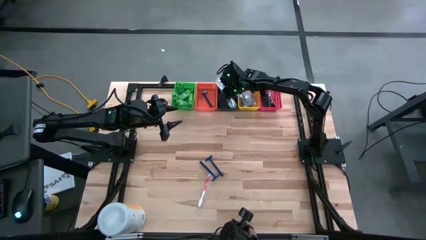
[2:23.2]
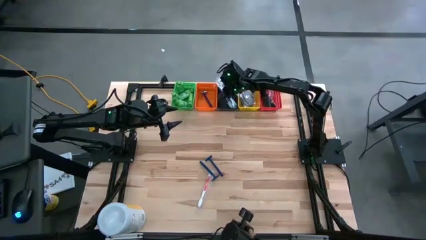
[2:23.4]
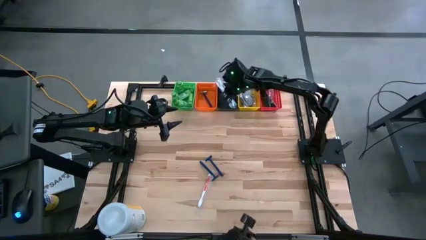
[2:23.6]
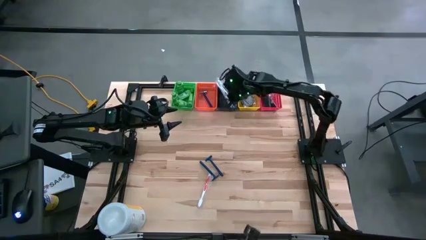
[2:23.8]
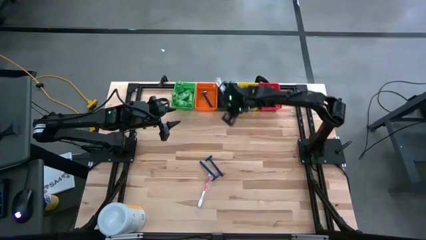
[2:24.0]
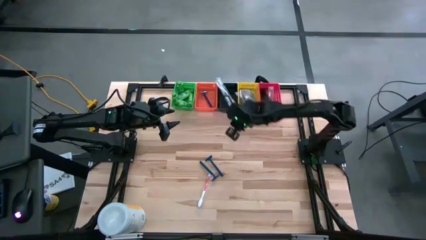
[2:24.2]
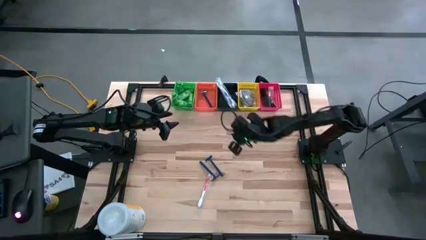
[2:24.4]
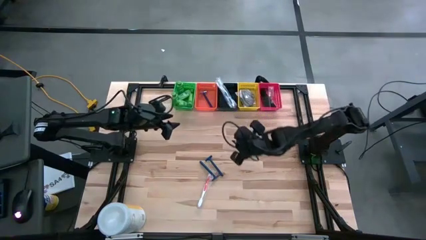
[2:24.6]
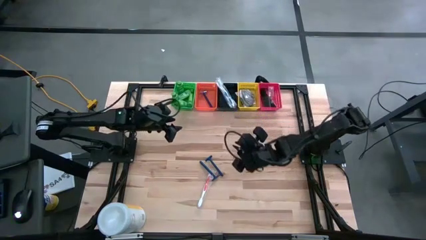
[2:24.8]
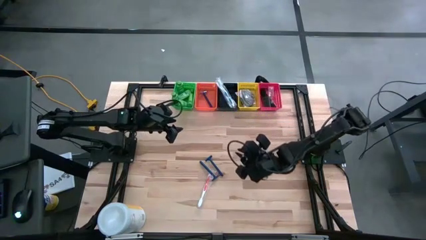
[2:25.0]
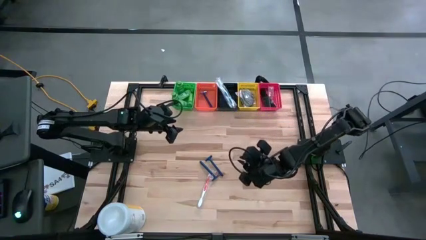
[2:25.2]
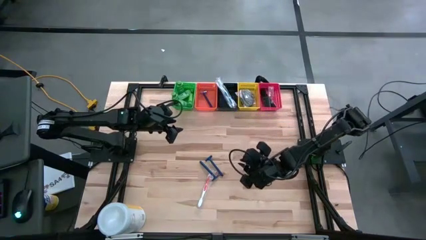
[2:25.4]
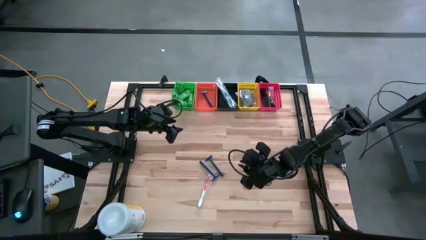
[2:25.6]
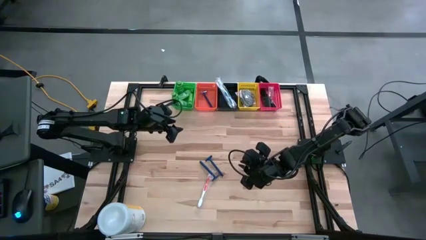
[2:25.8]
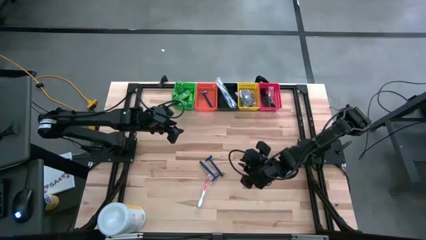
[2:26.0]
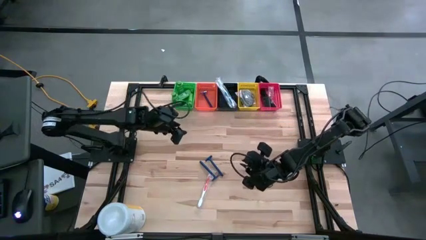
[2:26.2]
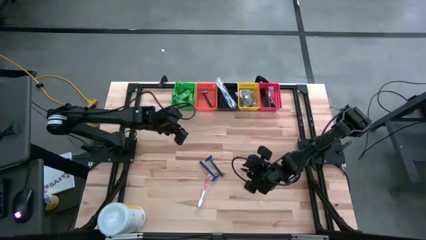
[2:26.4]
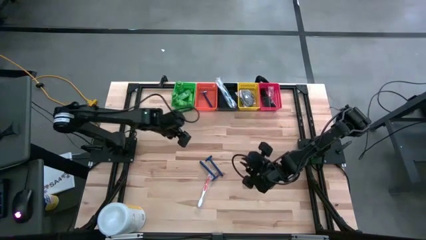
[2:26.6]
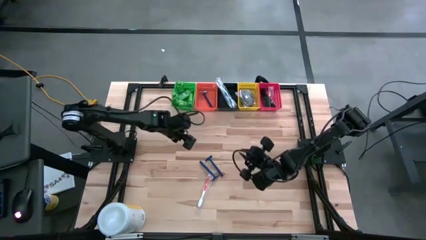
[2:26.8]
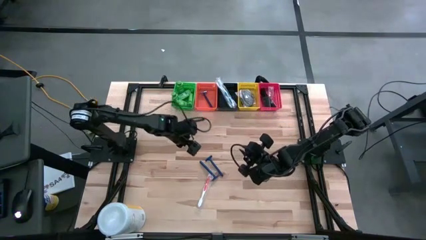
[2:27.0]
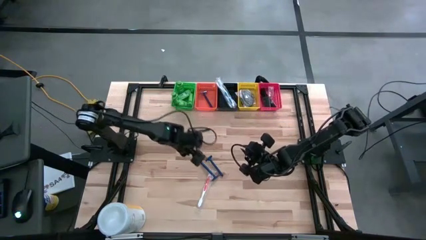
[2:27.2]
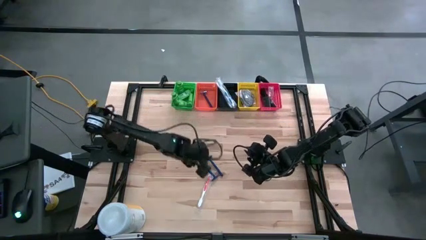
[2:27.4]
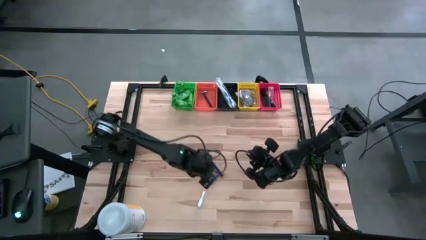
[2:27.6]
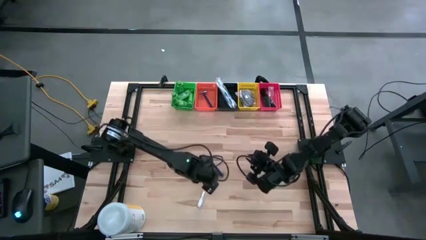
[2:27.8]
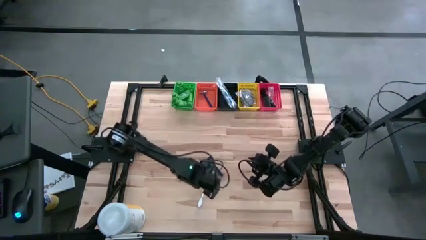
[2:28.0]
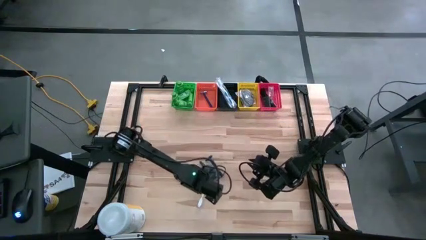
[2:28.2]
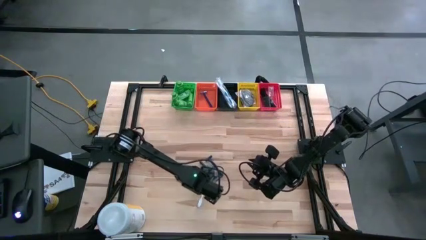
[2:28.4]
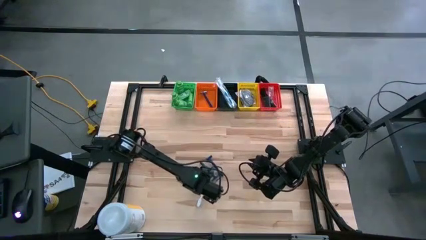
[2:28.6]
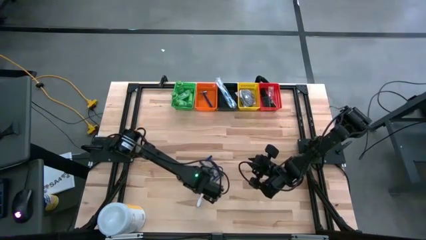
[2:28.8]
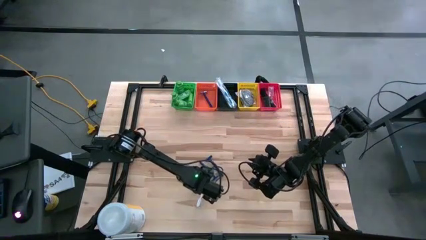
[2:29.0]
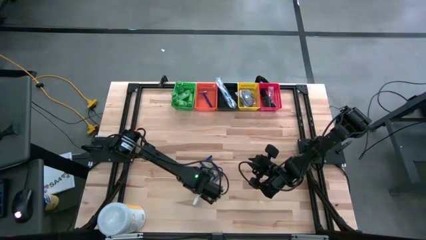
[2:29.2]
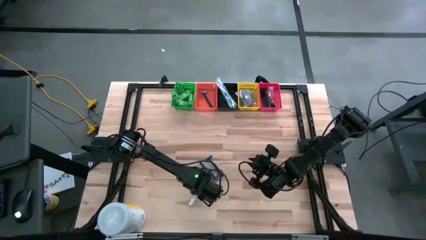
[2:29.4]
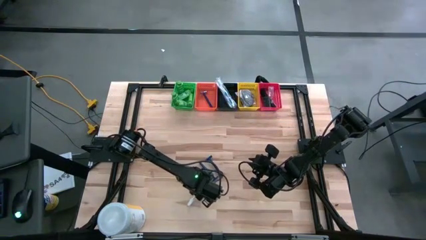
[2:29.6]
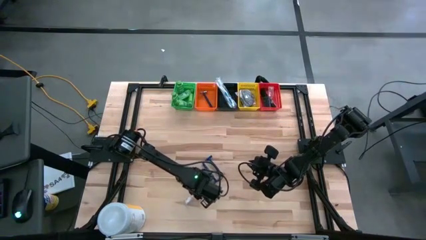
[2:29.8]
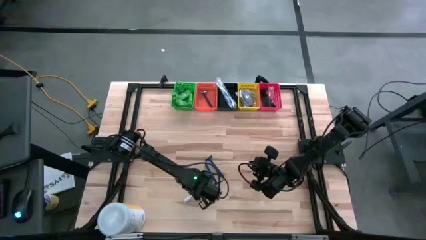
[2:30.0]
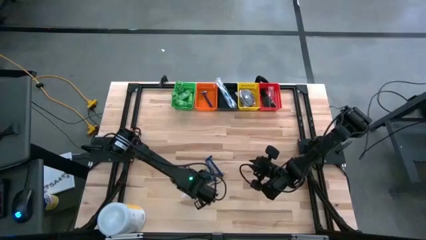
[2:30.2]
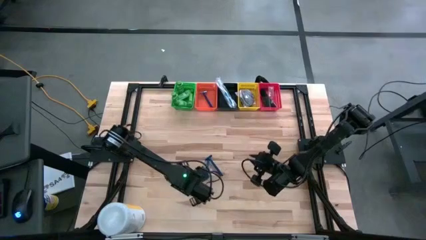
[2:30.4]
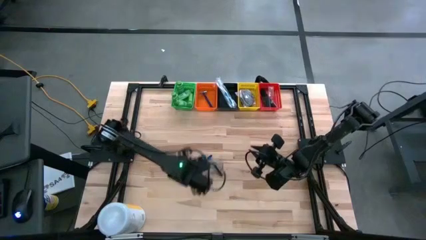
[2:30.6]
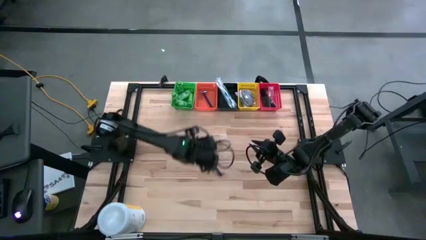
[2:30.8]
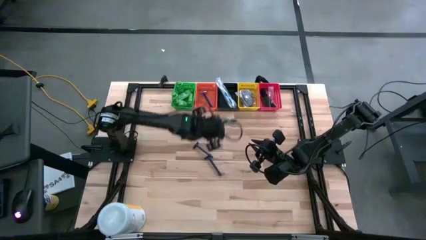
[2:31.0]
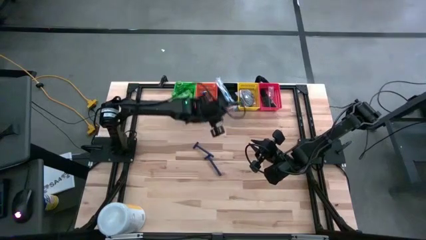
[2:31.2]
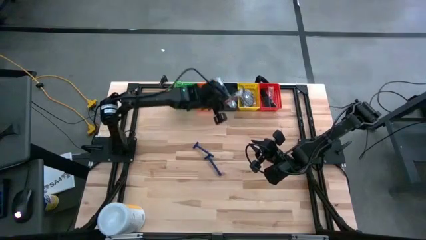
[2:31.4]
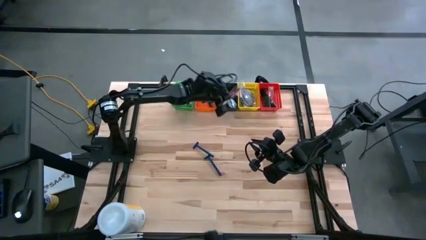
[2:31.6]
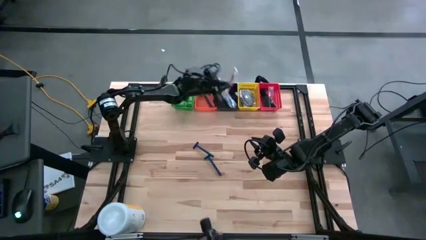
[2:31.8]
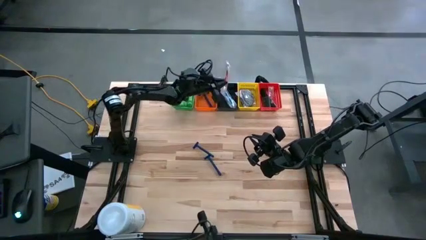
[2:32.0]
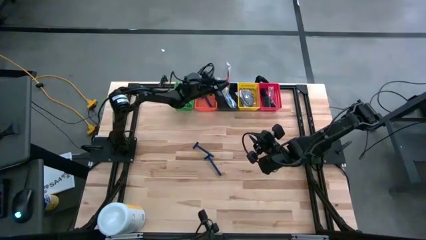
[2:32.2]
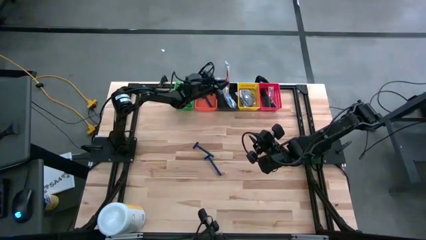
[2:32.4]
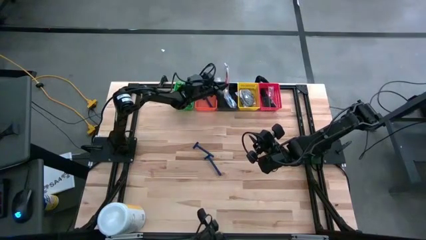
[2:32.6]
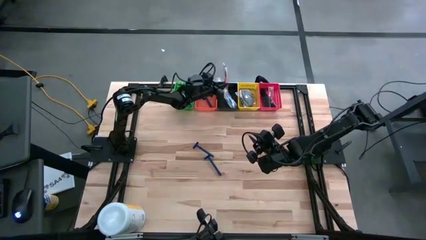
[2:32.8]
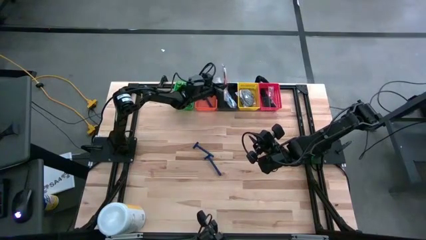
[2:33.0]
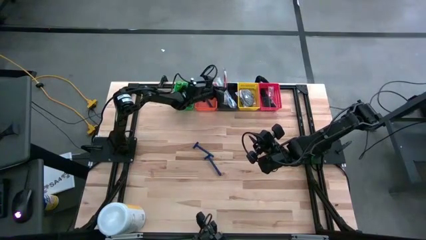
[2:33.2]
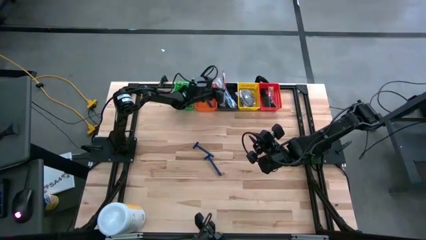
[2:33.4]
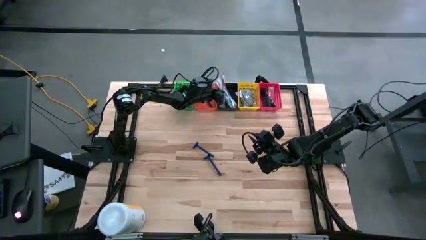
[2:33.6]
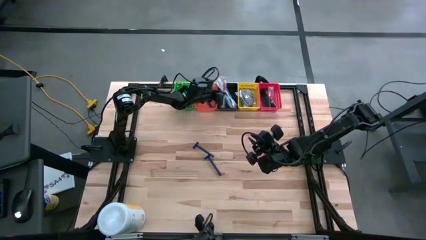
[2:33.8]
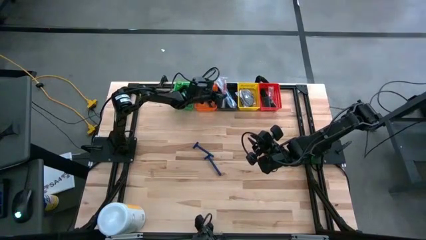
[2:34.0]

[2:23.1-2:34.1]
Task: Pick & Place Travel size toiletries
Put the orange toothbrush into the black bin

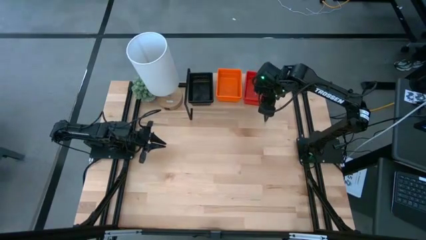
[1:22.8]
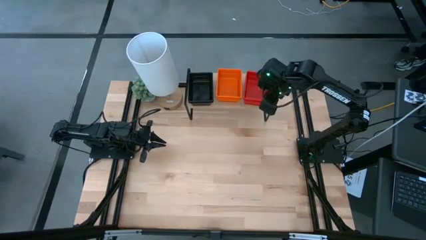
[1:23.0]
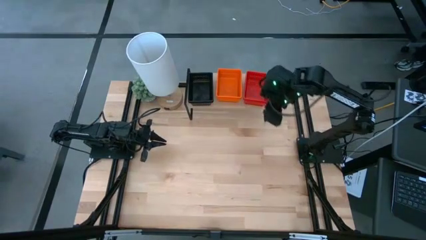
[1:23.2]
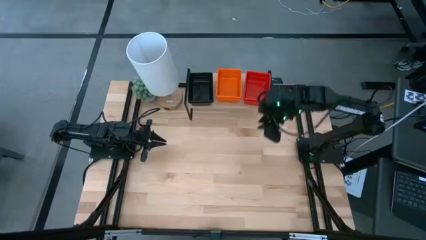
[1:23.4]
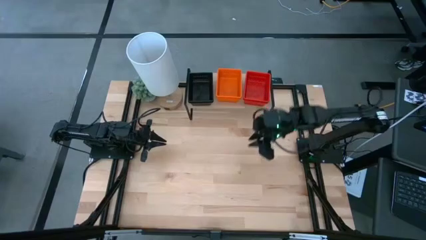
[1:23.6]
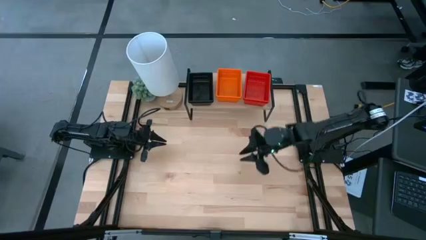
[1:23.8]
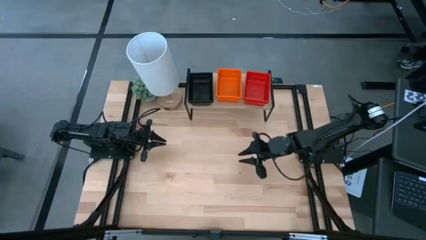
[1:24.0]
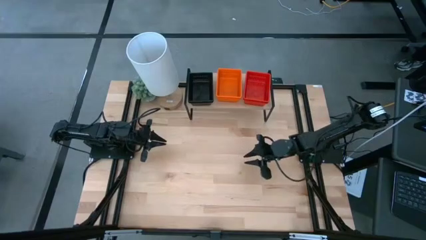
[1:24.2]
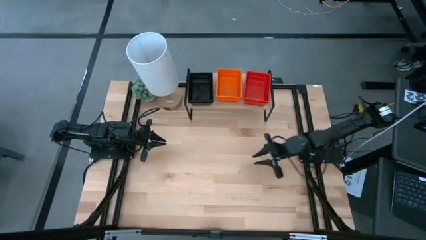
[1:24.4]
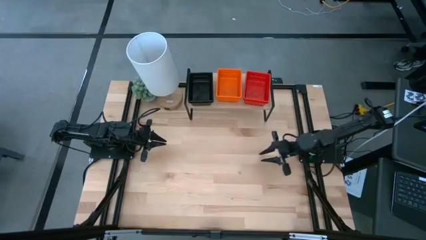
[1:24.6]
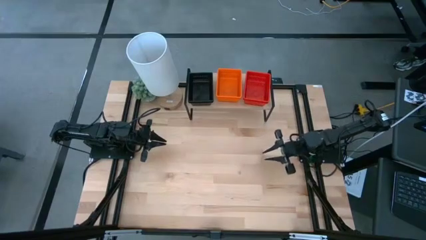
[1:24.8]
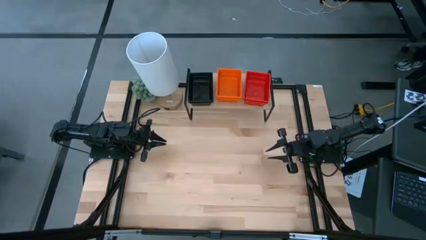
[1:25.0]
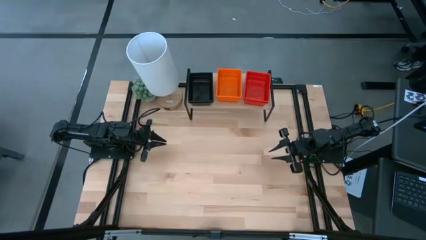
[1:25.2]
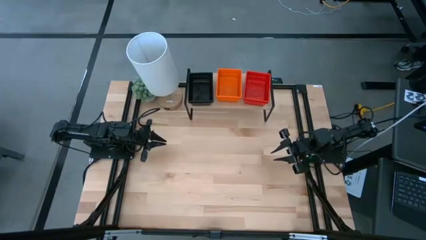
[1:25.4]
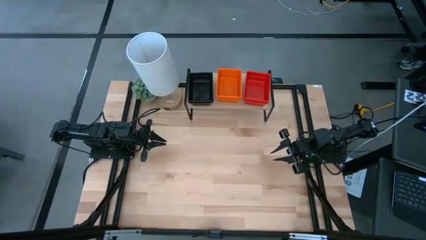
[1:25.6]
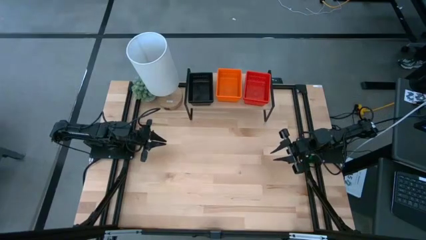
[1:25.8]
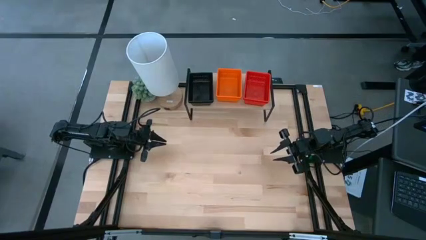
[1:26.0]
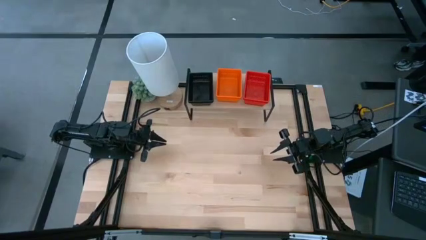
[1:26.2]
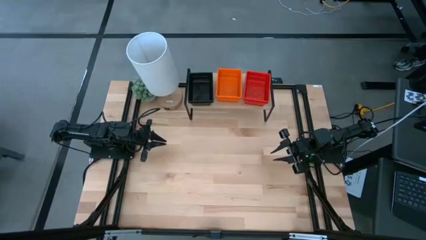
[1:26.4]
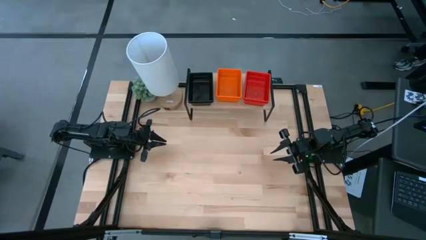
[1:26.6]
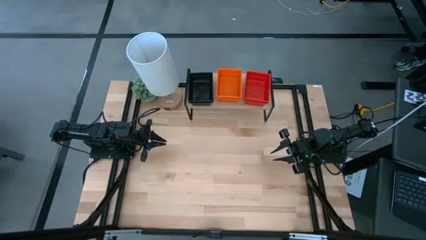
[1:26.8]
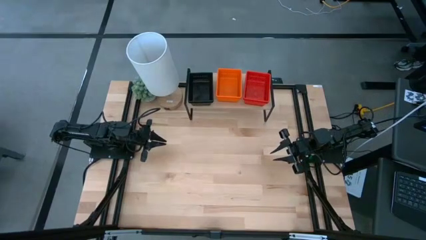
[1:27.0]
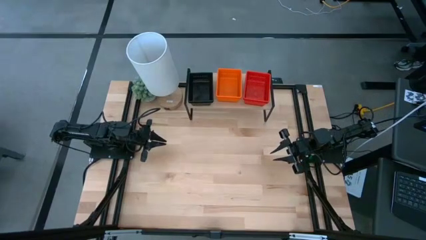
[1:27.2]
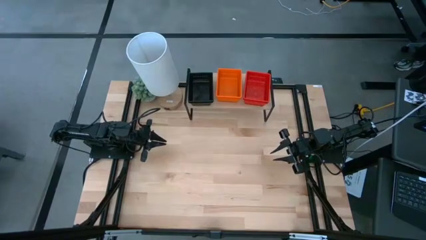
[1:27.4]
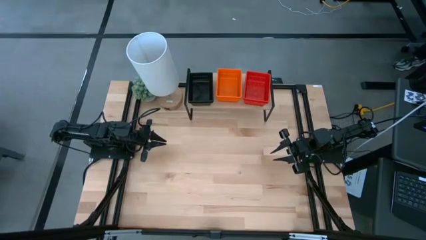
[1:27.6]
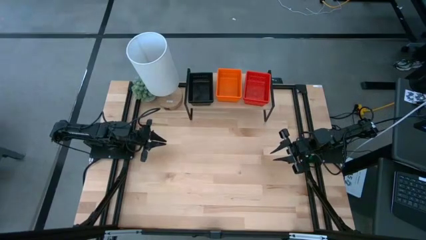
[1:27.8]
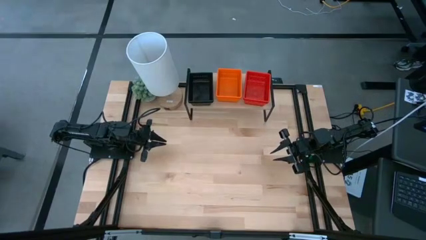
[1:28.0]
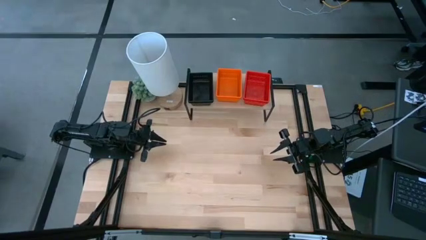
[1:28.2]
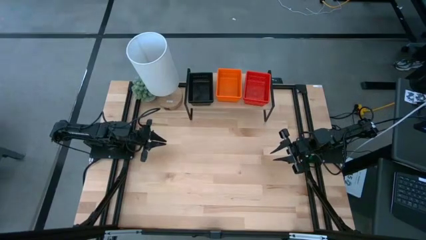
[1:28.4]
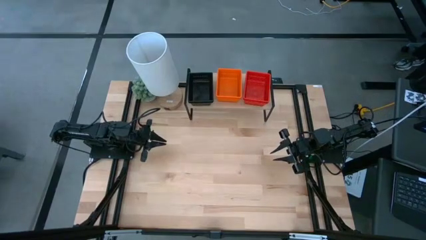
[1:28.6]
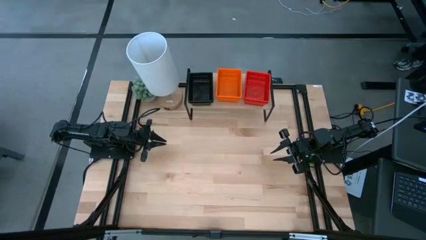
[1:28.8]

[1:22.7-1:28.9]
Task: Stack baskets on shelf by color
Return to Home Position
